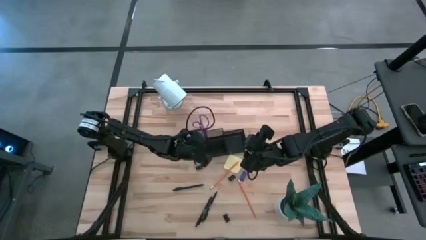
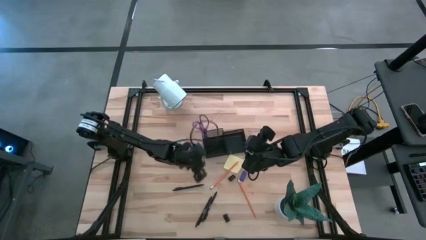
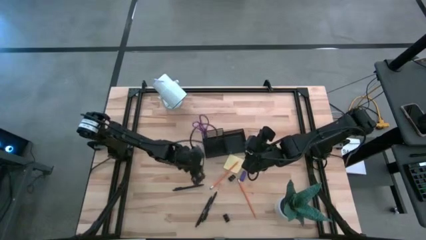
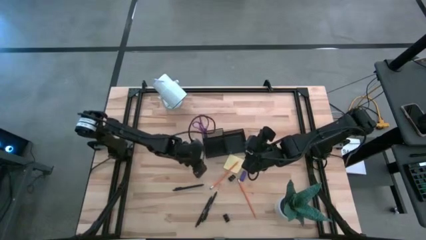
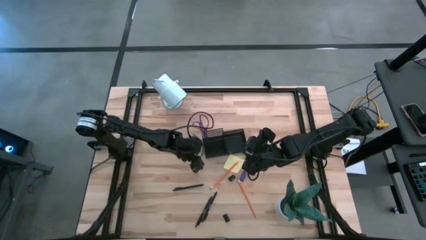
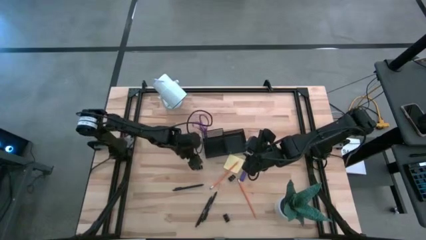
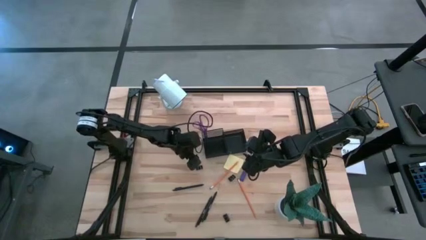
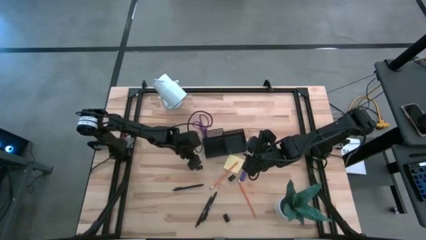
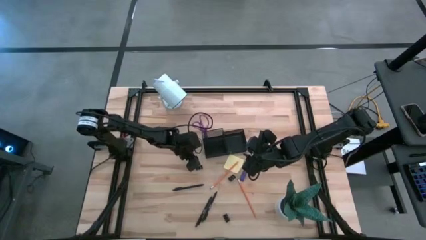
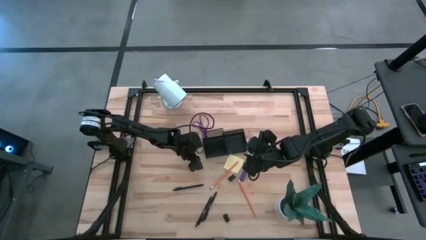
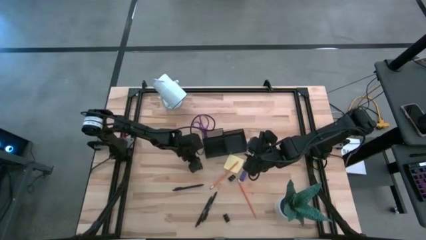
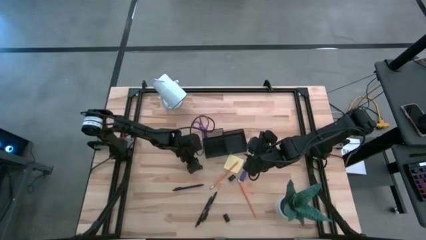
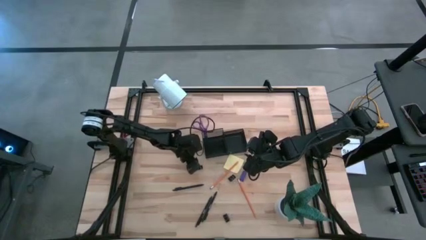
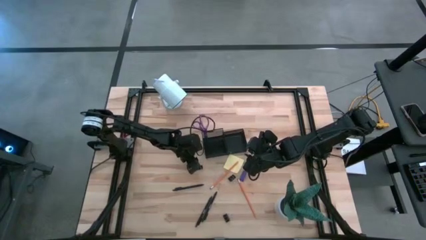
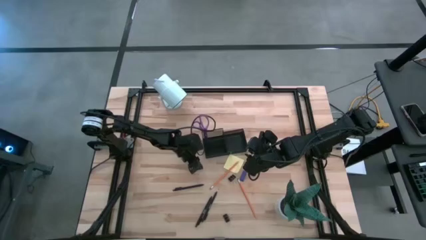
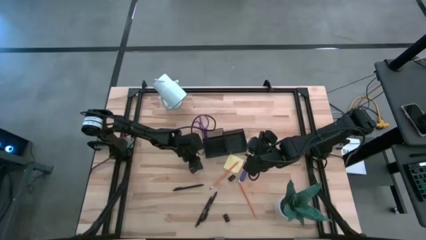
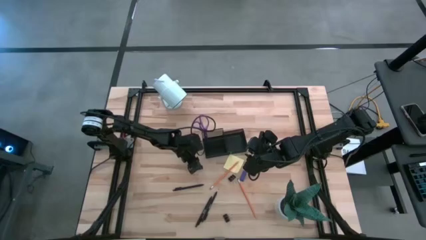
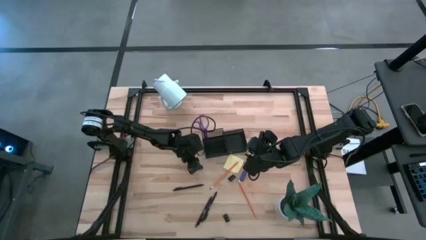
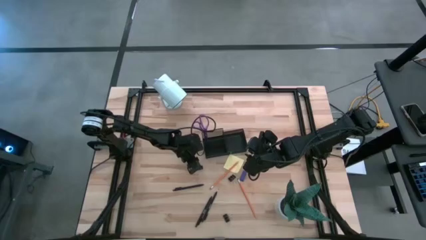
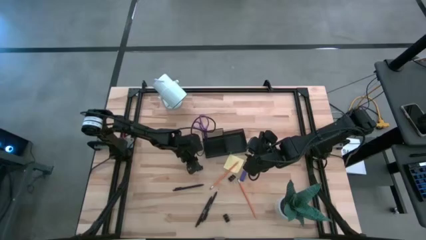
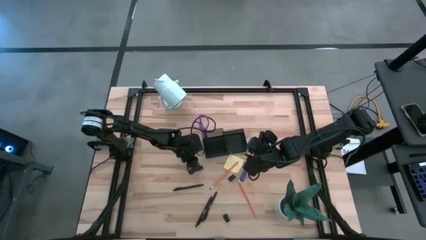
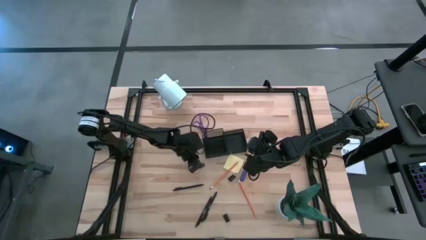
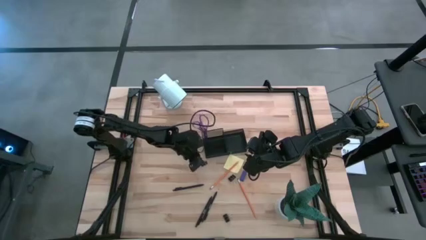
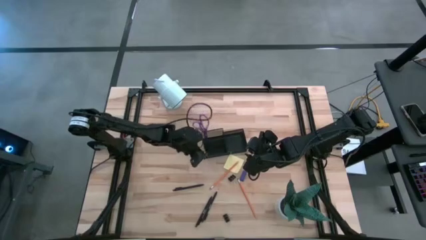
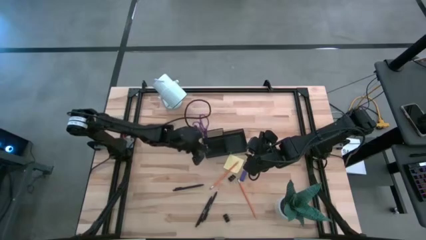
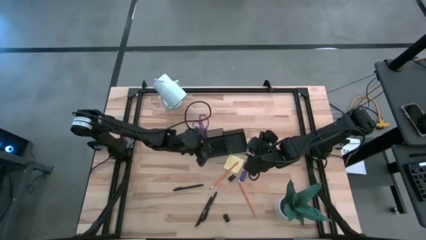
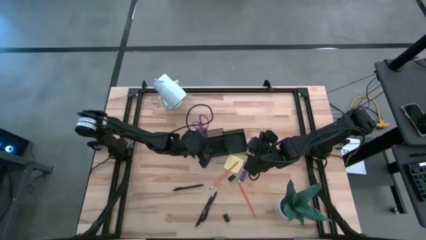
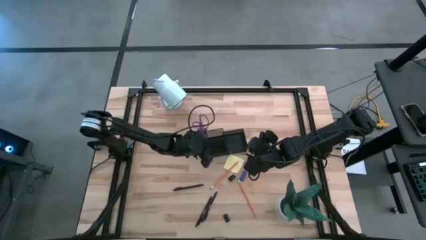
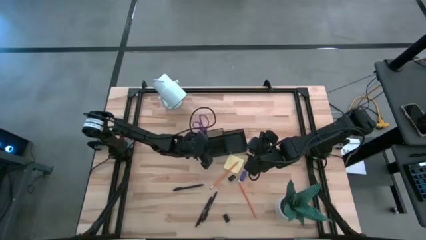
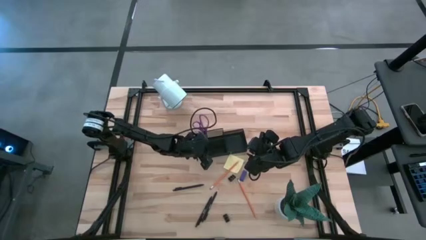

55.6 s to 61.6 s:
Task: Pick and place office supplies into organizer
Put the top left black binder clip into the black desk organizer

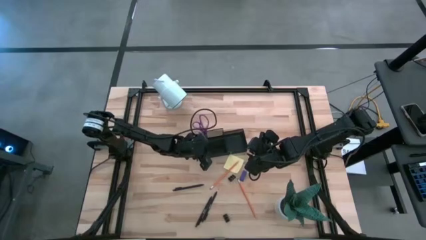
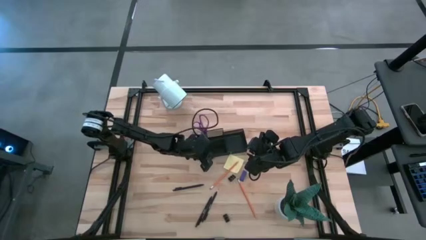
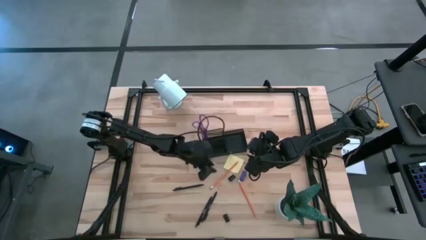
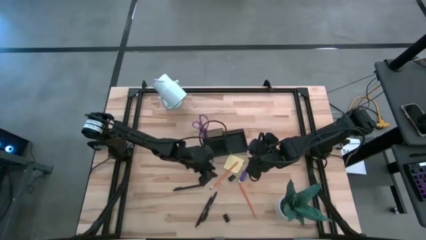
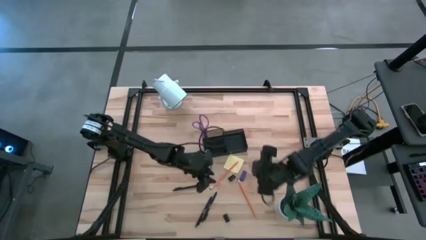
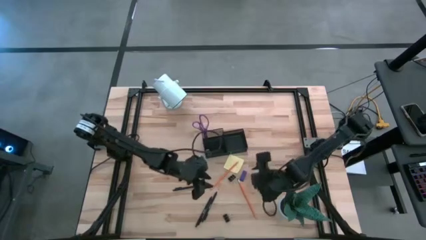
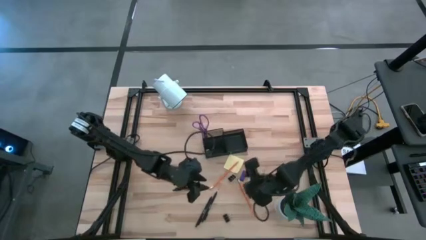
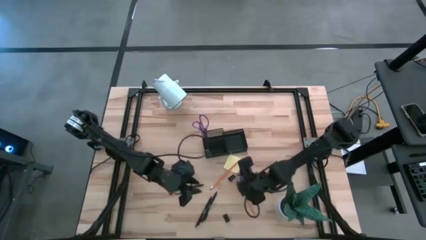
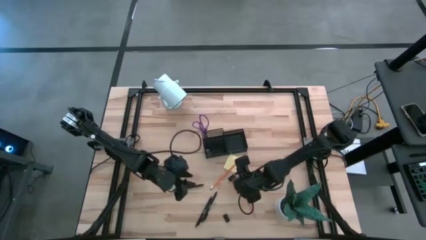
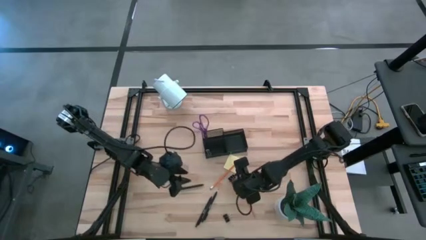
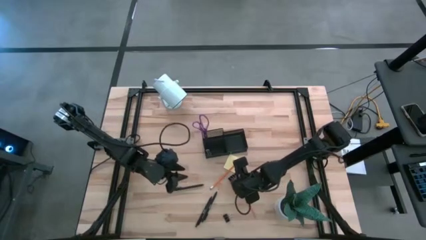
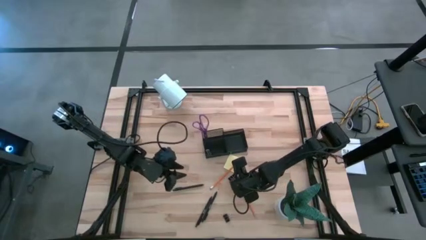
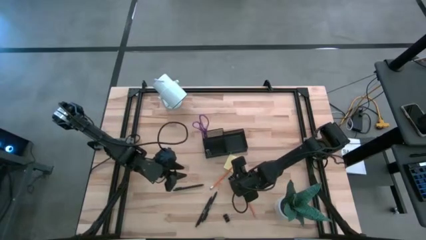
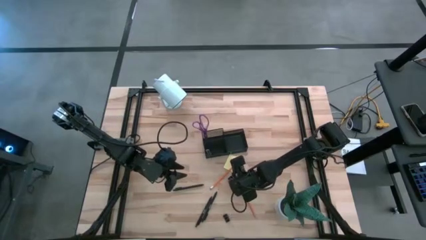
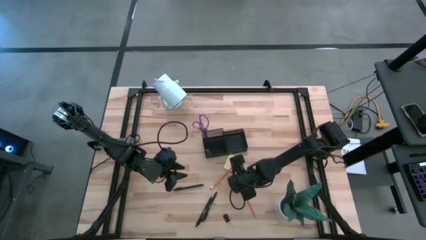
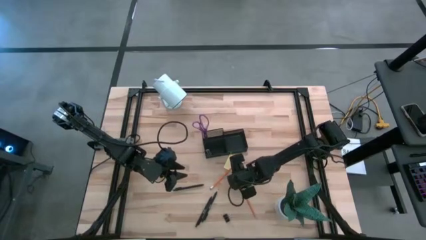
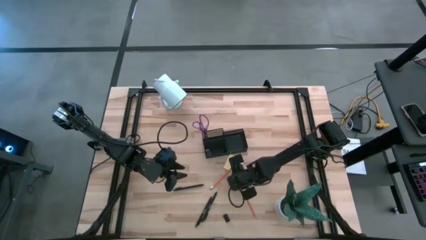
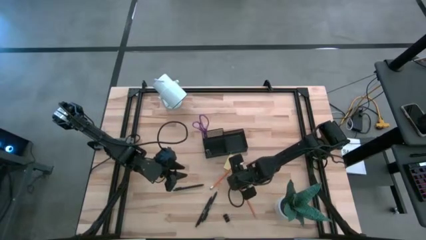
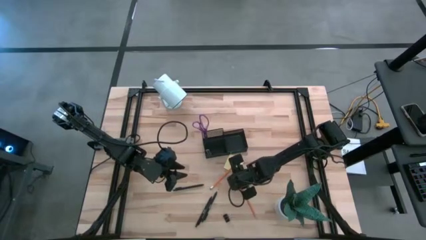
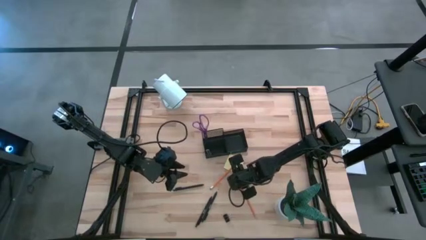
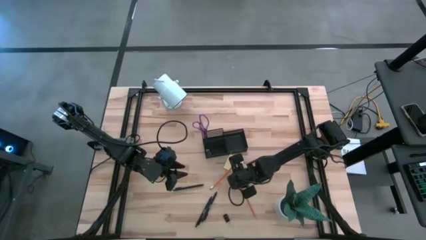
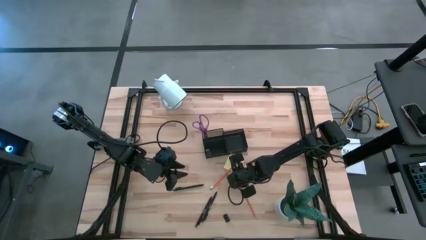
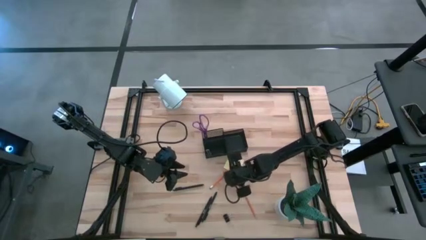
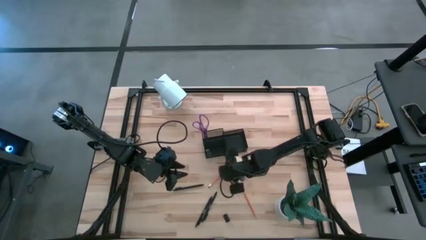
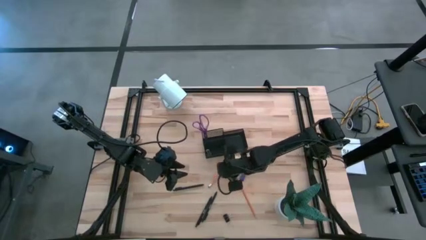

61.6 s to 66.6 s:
Put the top black binder clip into the black desk organizer

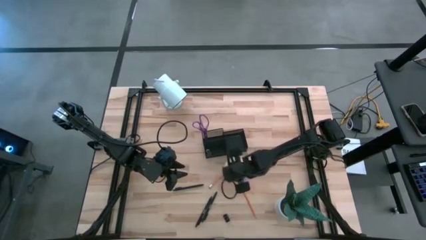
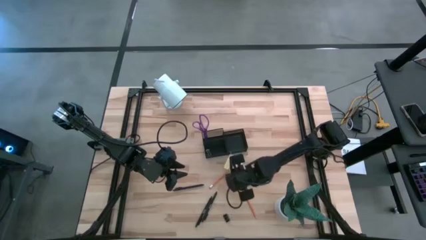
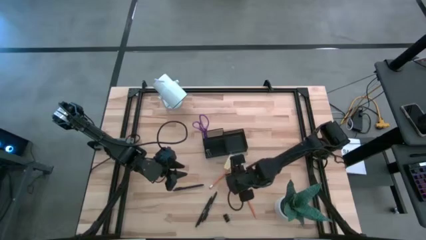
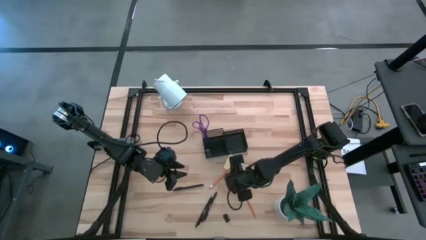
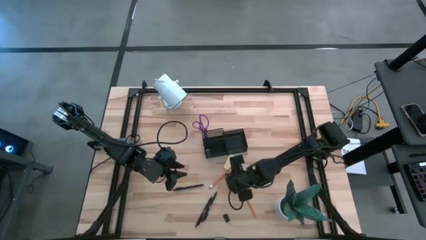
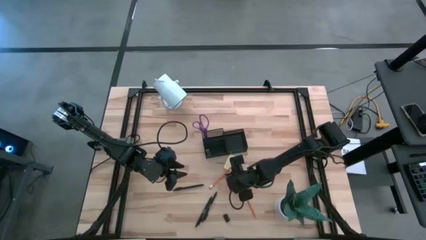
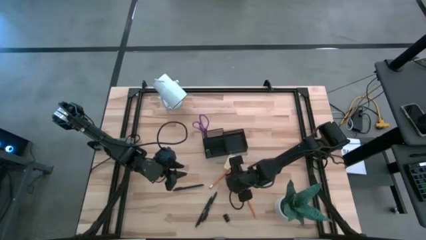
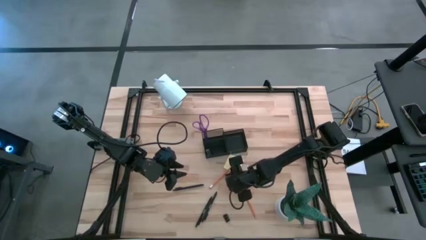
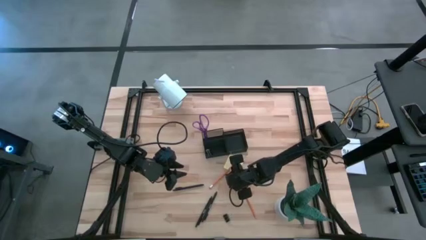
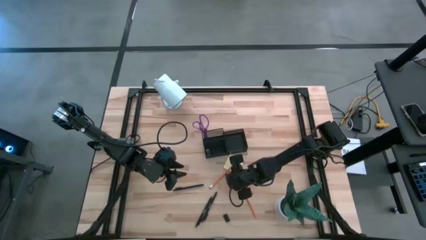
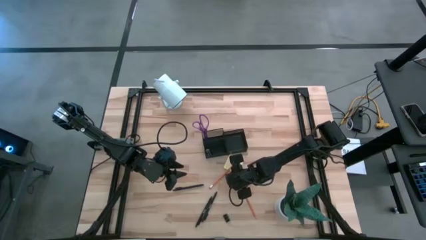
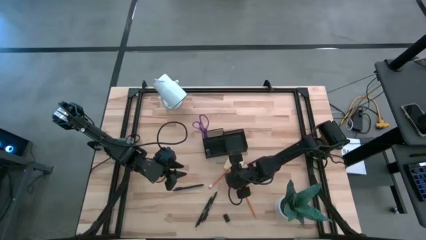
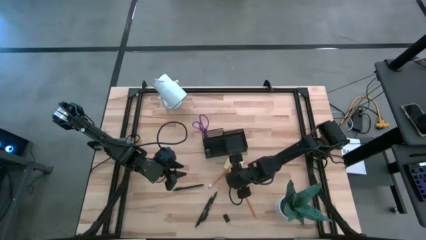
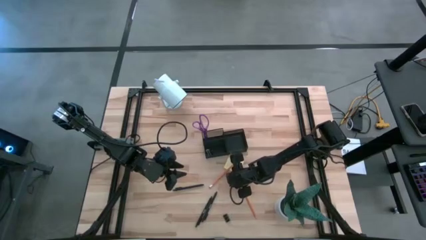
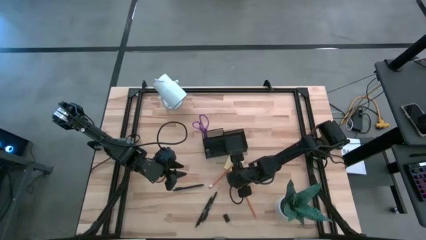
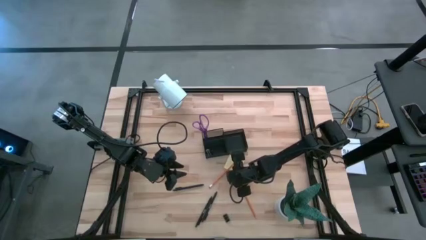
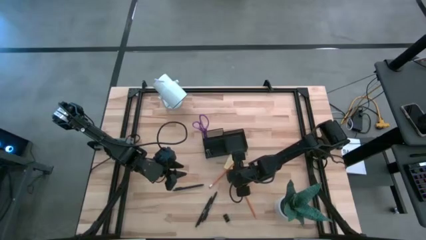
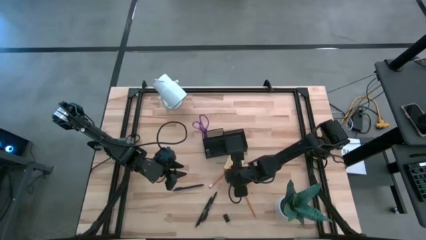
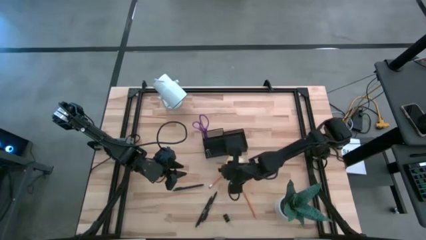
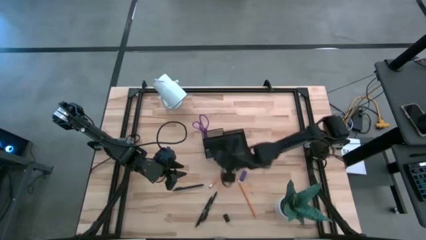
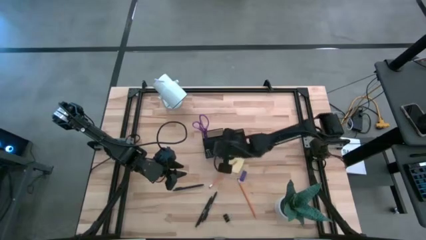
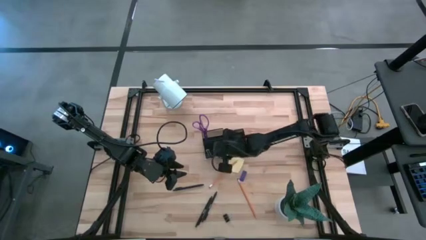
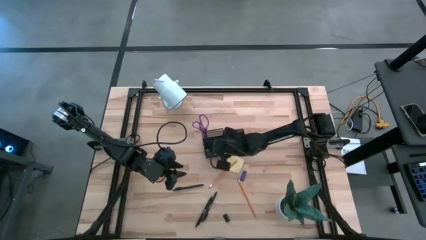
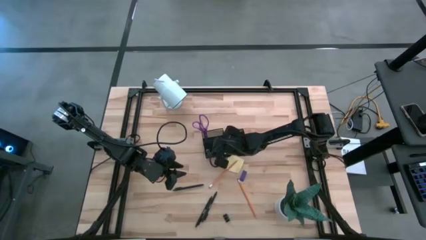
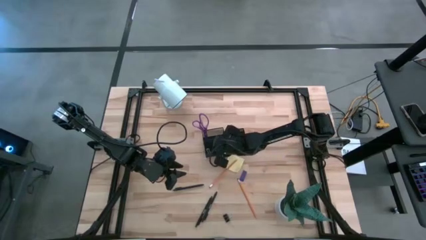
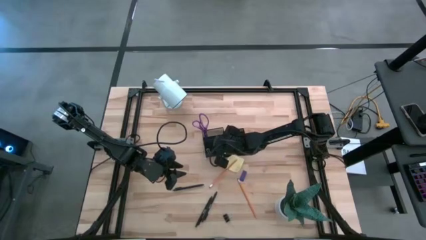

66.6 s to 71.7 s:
Put the top black binder clip into the black desk organizer

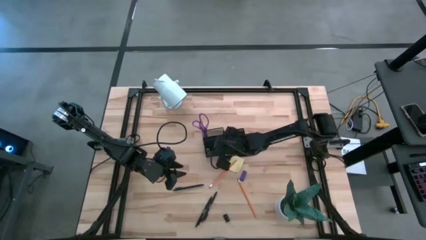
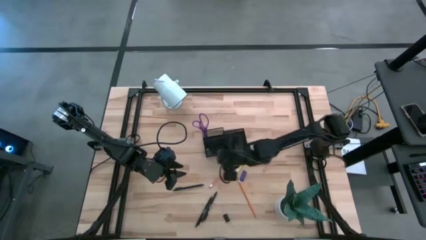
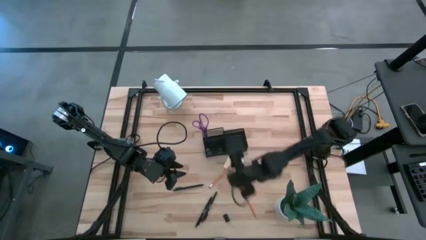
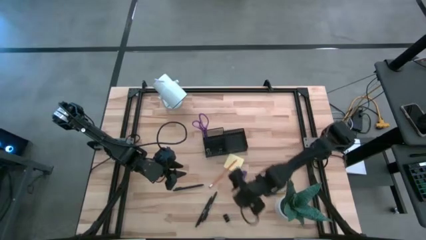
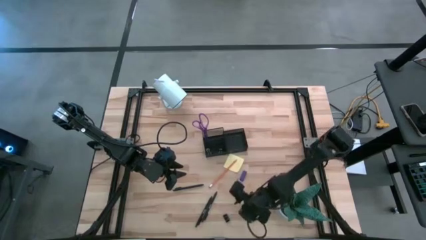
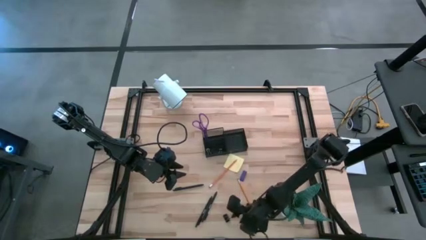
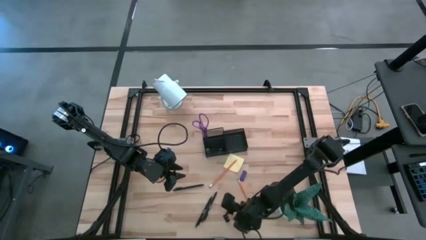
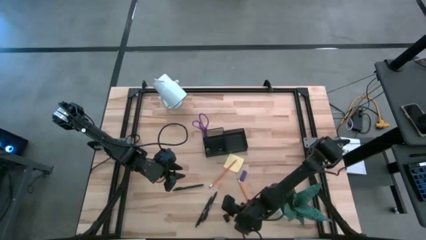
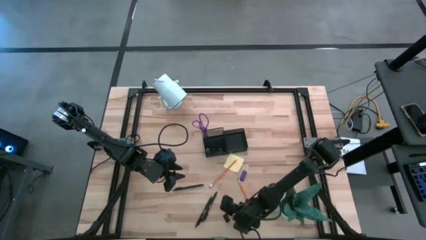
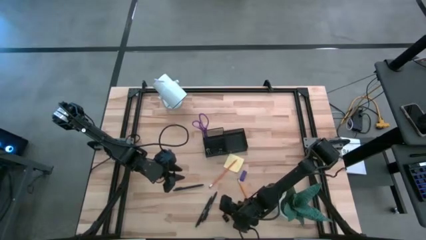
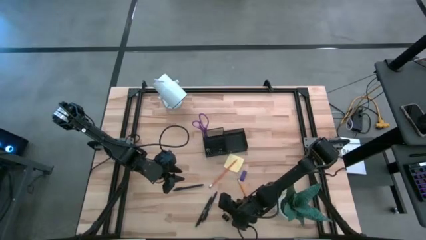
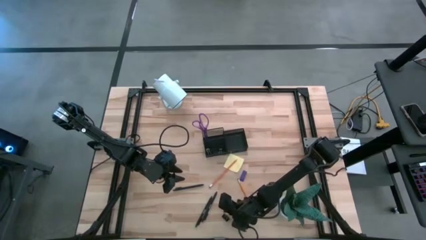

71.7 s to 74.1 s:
Put the black binder clip into the black desk organizer
